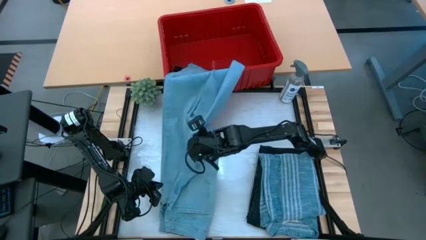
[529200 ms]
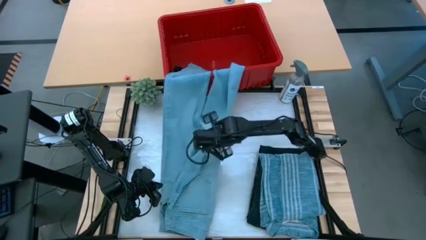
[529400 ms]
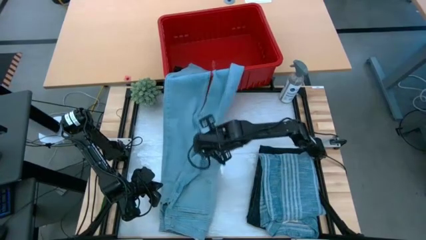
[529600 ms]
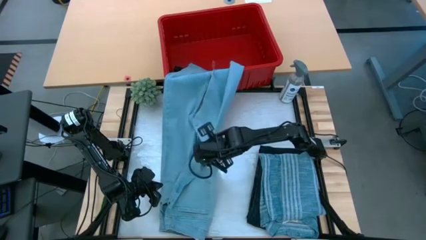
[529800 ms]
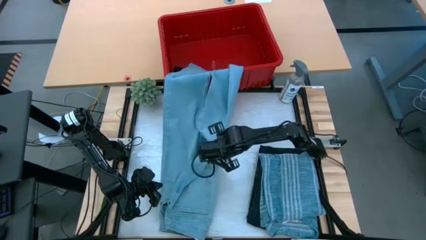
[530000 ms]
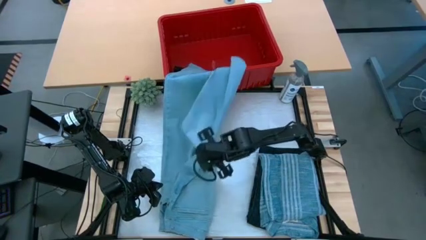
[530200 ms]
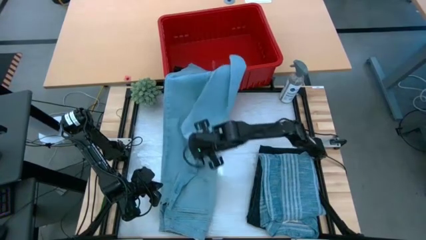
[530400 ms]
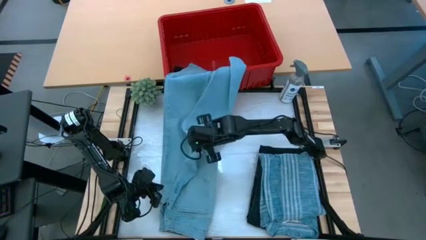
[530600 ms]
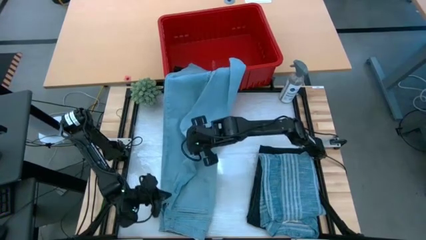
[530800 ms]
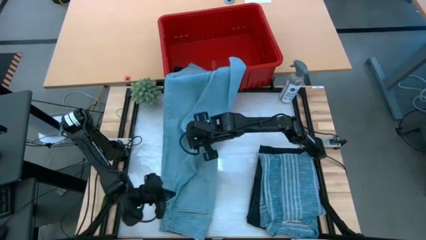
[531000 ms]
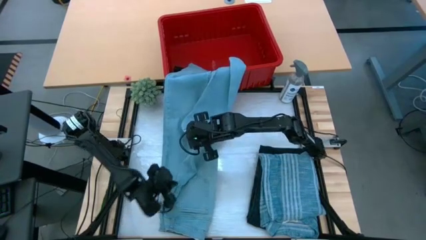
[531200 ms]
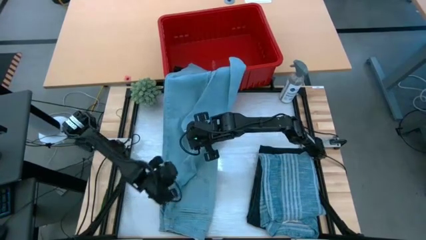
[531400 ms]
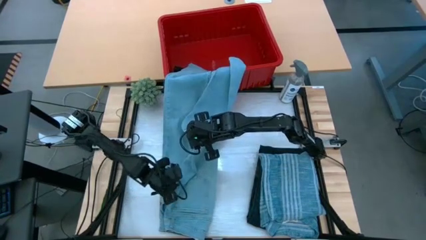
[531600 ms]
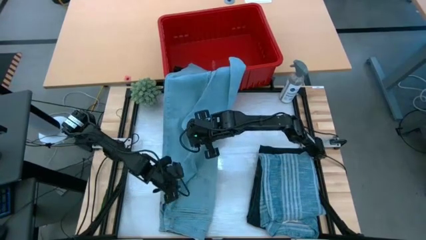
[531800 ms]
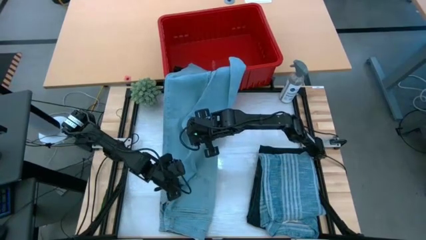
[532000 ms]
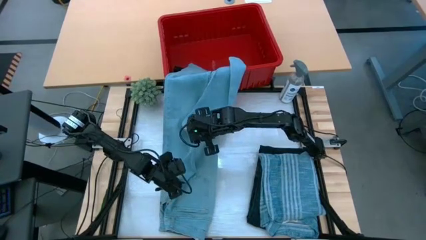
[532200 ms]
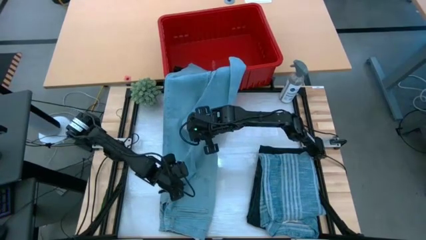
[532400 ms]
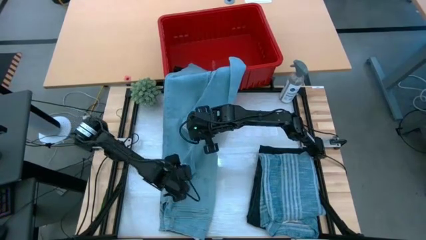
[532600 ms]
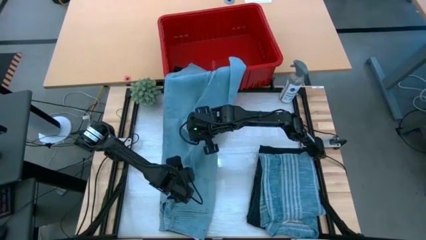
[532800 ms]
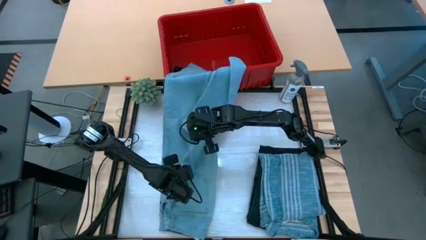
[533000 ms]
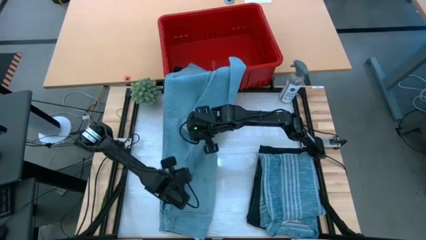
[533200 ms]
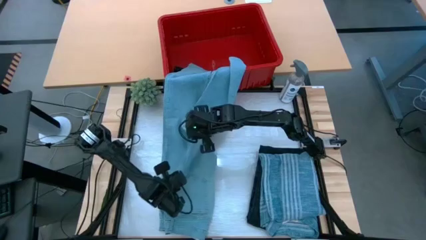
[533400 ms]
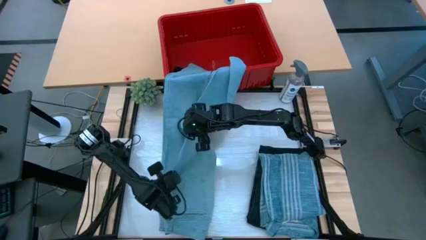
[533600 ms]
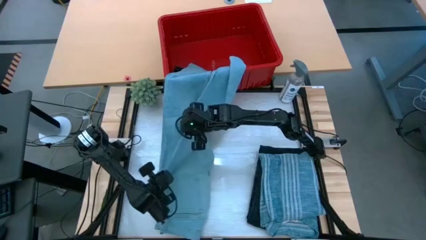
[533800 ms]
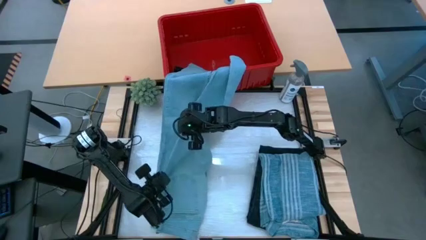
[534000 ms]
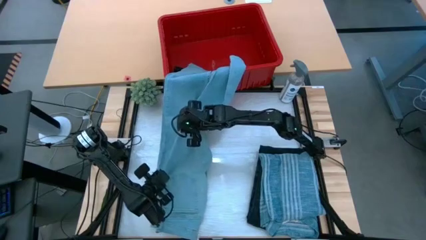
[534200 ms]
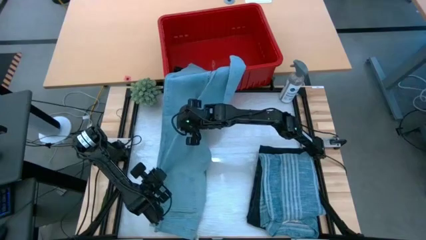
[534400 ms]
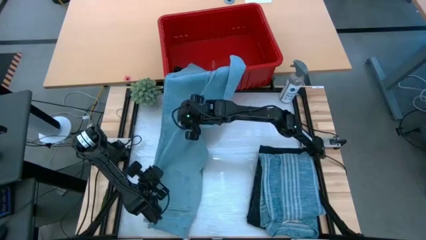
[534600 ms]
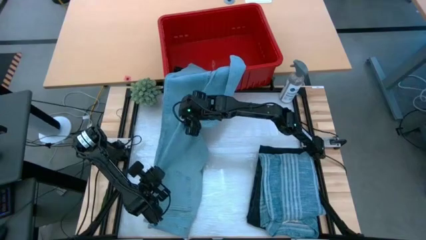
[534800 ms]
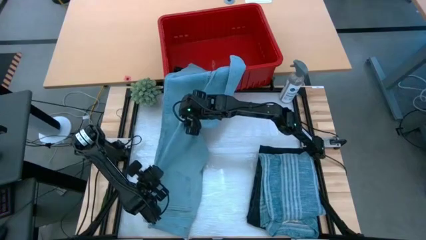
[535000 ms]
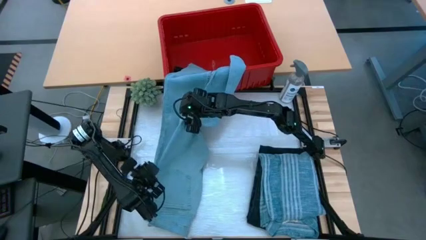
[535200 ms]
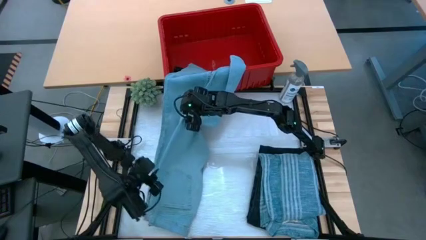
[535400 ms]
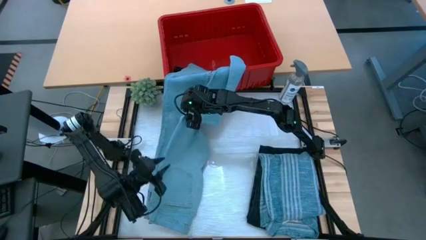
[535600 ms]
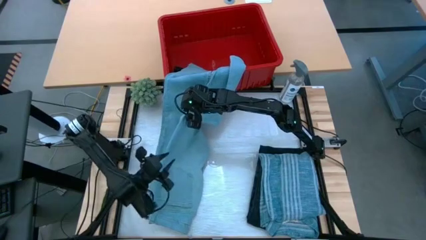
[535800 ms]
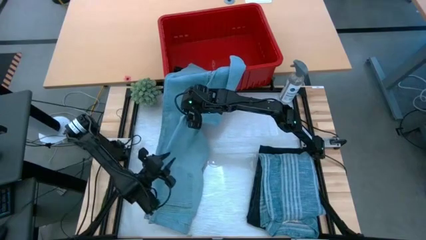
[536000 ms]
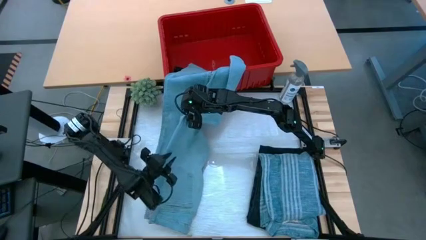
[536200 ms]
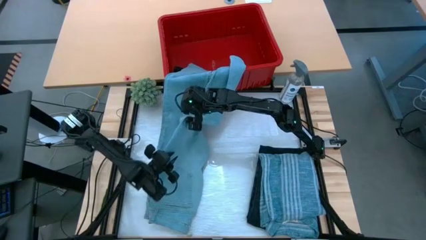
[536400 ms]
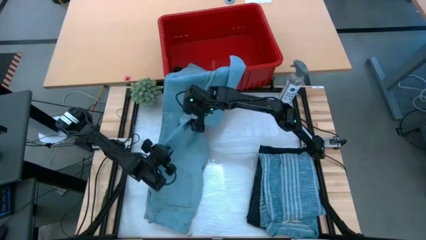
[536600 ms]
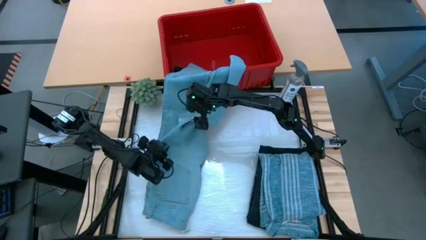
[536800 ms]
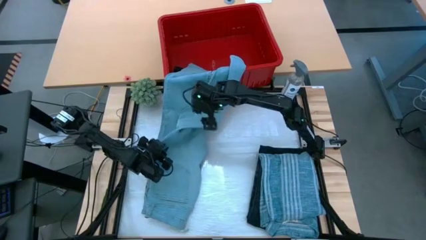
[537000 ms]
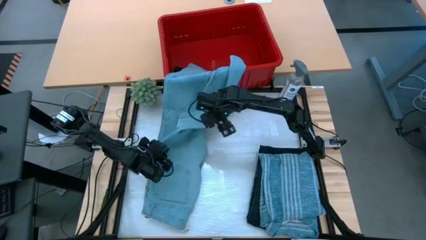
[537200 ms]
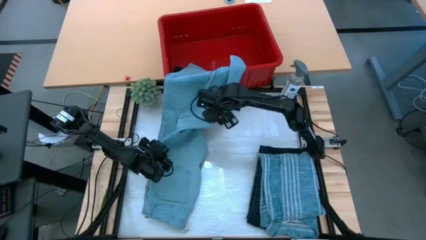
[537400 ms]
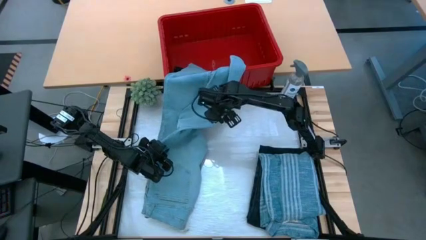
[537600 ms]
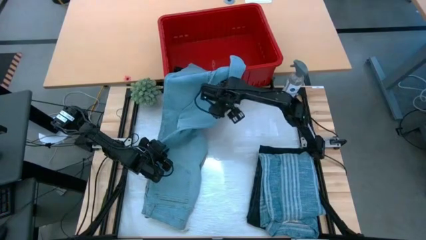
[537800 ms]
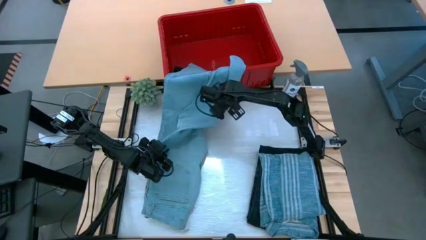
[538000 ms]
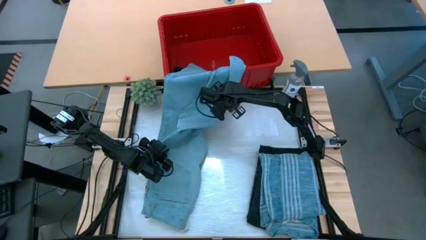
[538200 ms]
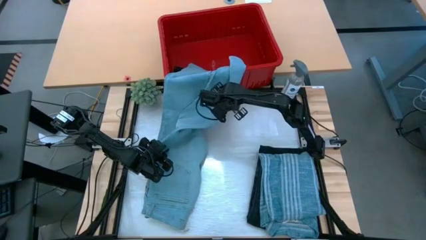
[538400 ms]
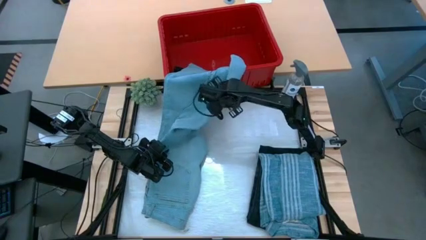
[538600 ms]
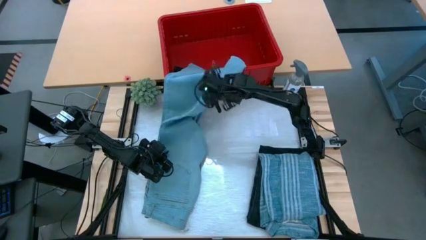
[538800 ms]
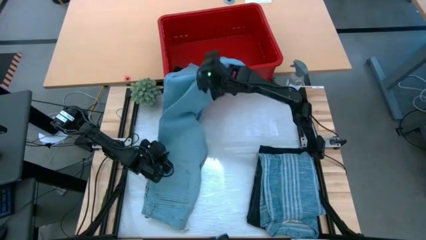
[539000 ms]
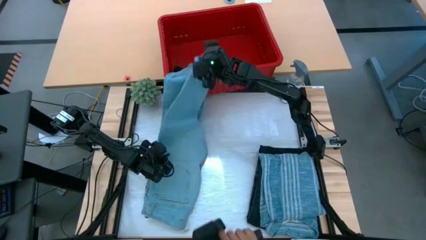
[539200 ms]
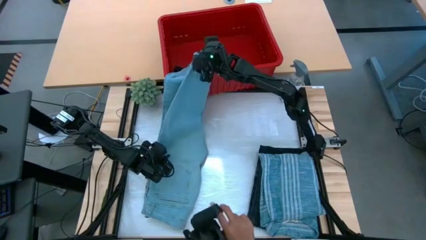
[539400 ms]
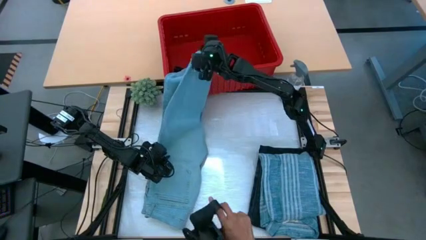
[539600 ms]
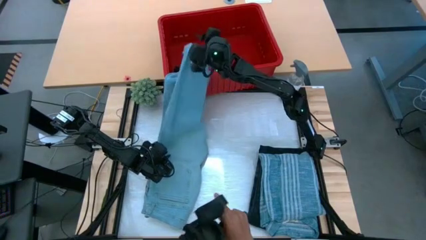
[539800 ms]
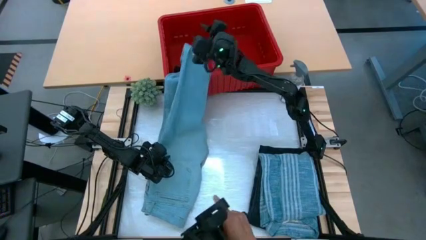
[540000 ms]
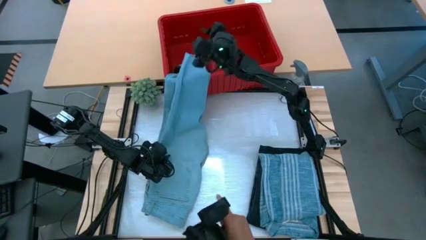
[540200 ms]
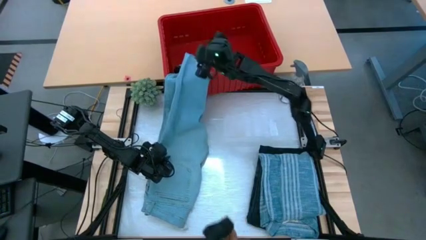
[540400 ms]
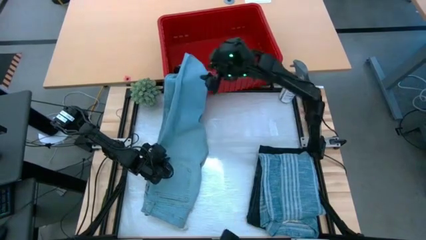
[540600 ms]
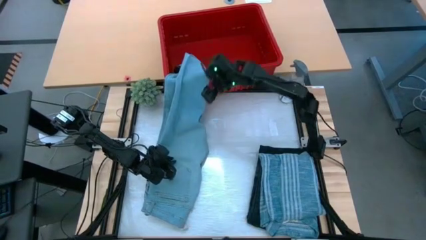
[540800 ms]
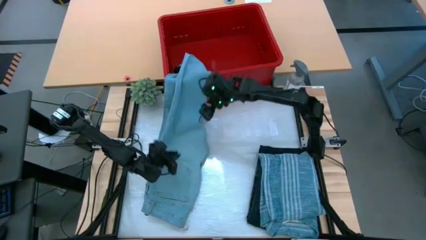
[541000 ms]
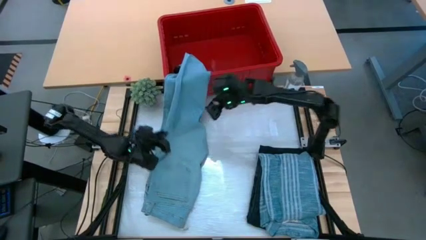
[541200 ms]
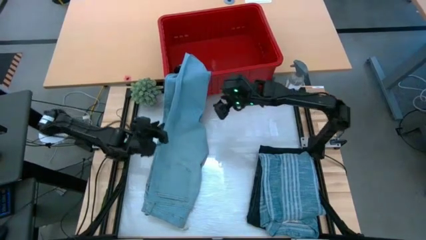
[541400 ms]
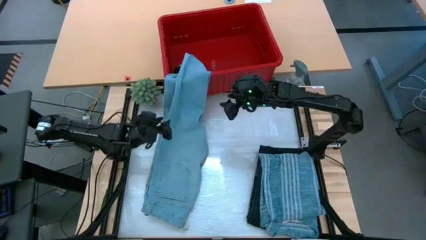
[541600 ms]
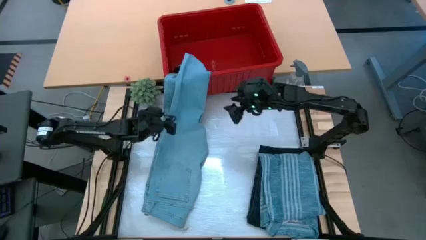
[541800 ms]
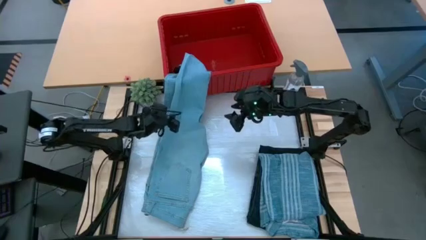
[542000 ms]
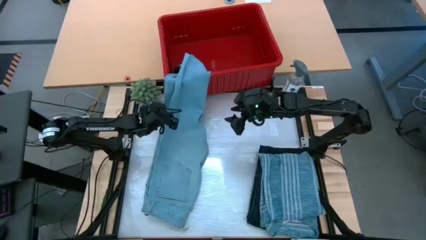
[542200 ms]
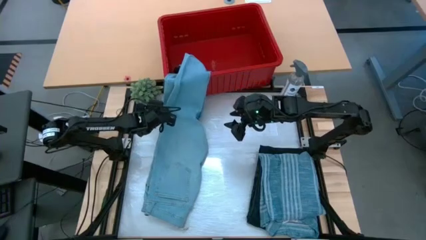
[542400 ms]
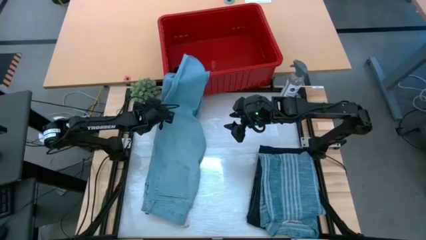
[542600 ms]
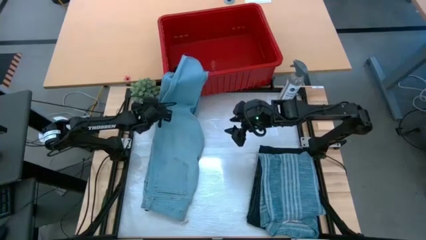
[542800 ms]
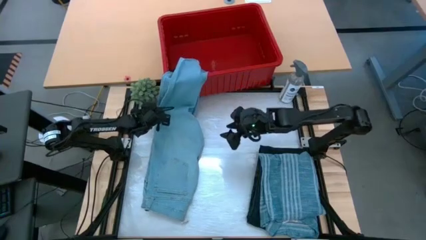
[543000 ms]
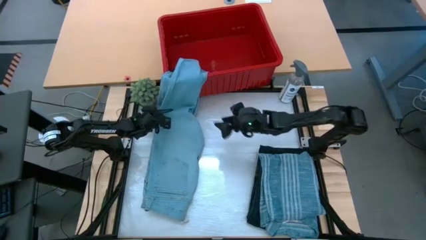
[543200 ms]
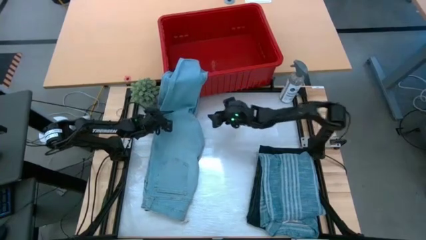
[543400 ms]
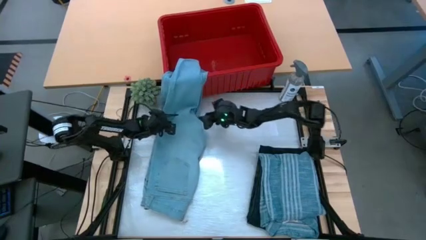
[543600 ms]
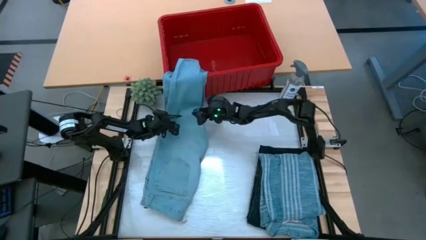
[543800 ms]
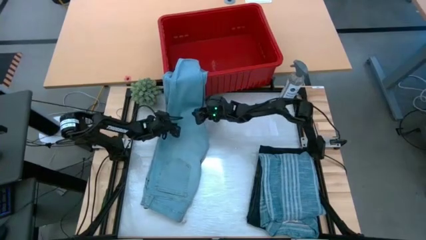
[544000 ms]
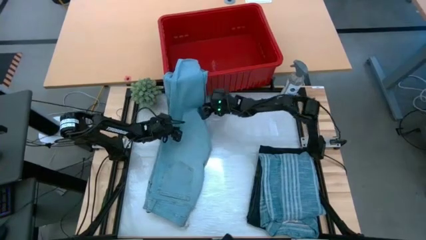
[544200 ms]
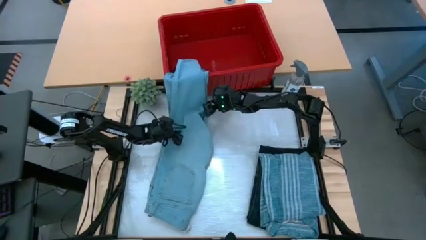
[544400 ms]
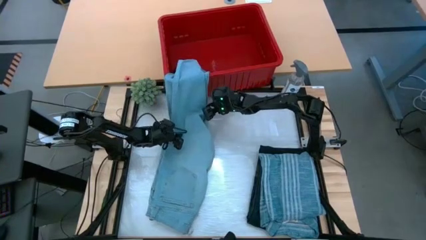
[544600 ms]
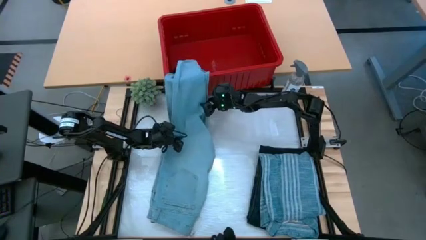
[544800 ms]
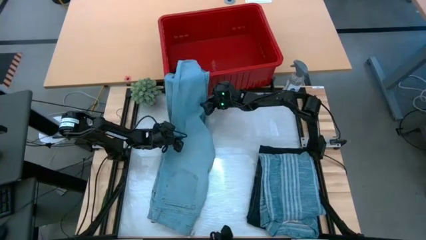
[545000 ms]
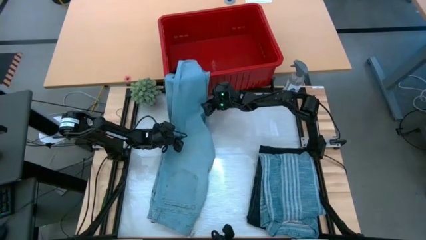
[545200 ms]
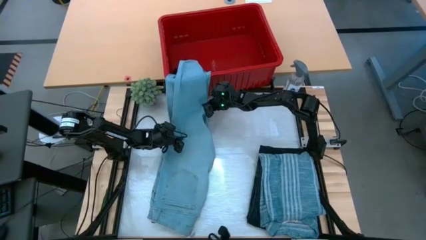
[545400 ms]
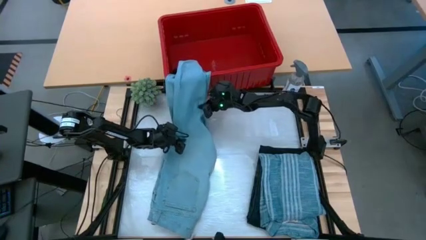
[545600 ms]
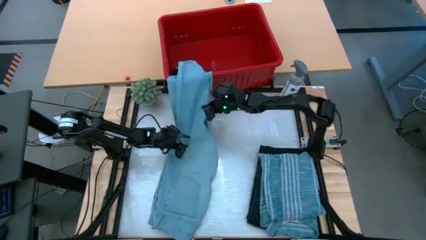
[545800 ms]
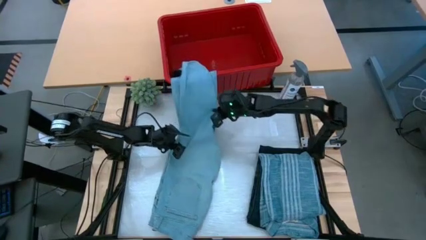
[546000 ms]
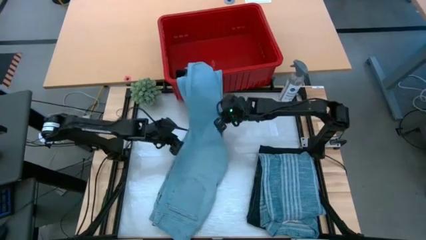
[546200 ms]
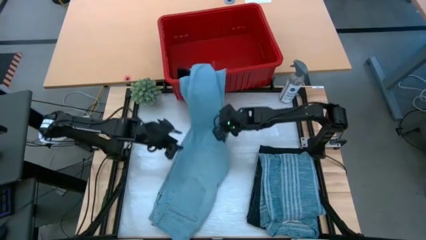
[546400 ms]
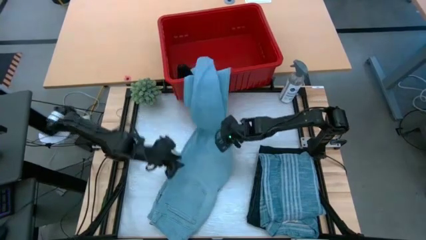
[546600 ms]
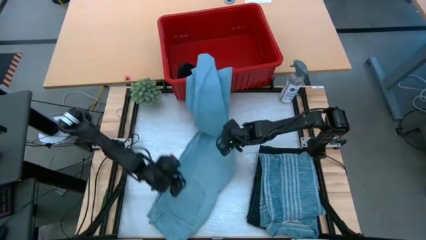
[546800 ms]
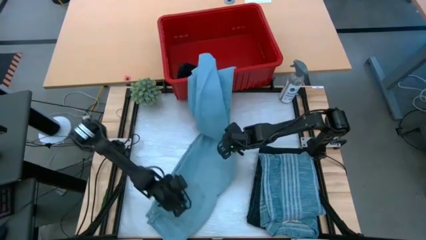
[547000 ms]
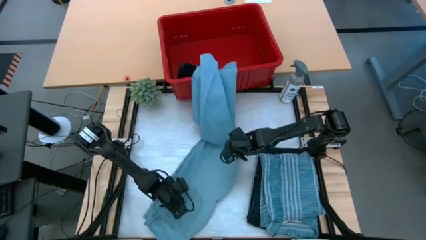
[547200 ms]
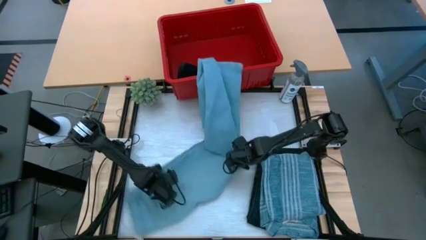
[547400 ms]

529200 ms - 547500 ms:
Task: Fold Laundry from Bin
Fold the light blue denim pants
